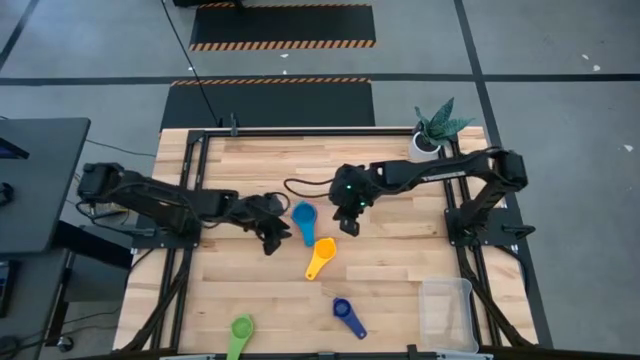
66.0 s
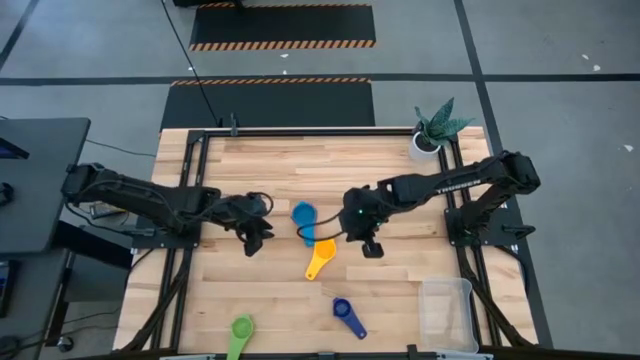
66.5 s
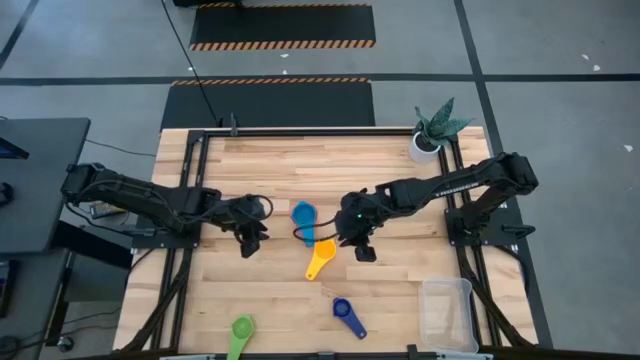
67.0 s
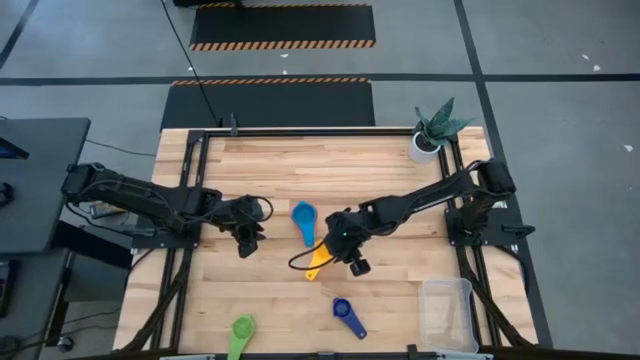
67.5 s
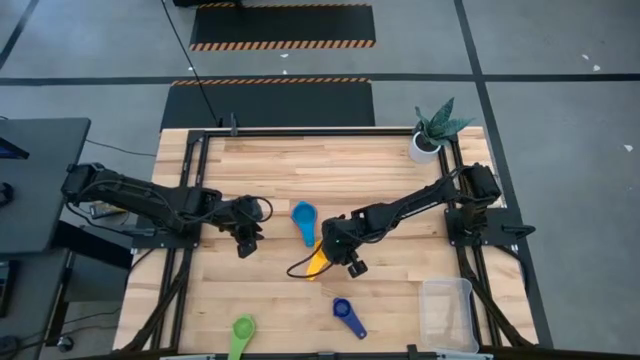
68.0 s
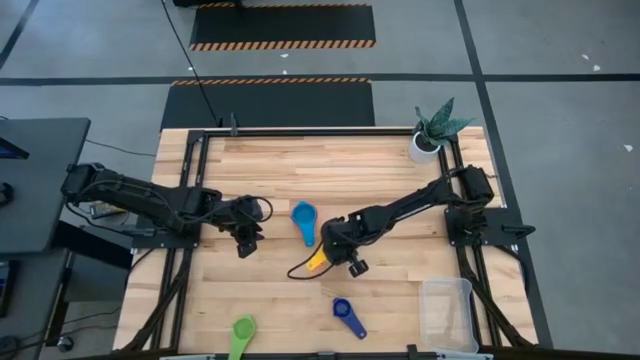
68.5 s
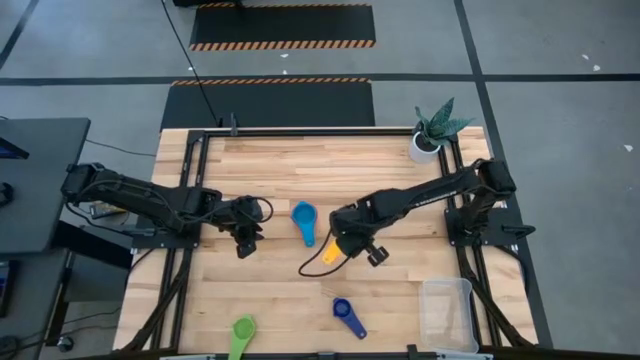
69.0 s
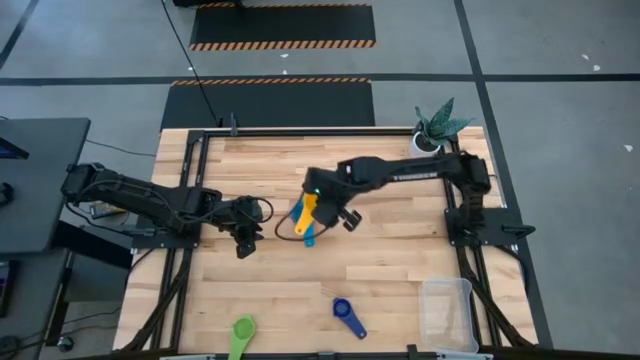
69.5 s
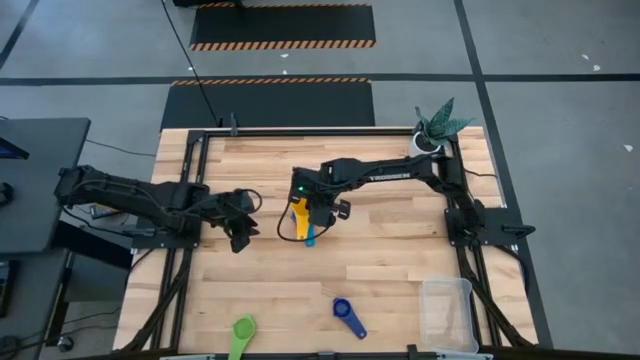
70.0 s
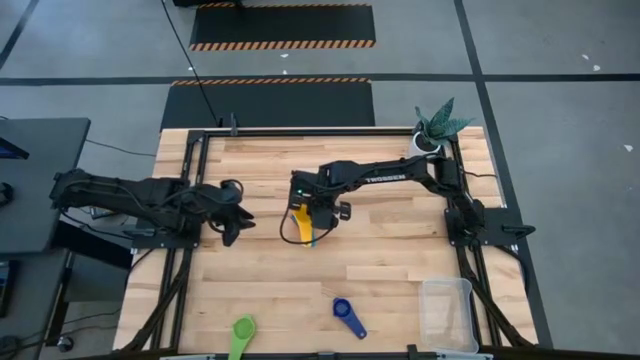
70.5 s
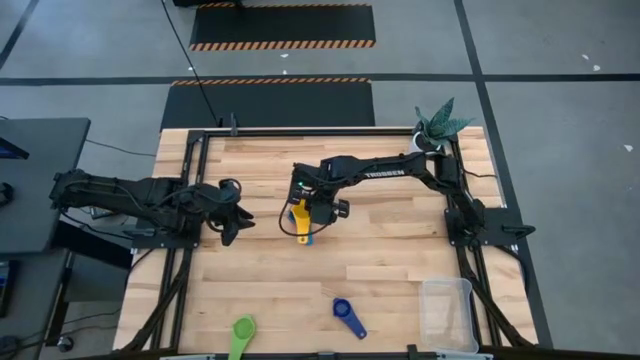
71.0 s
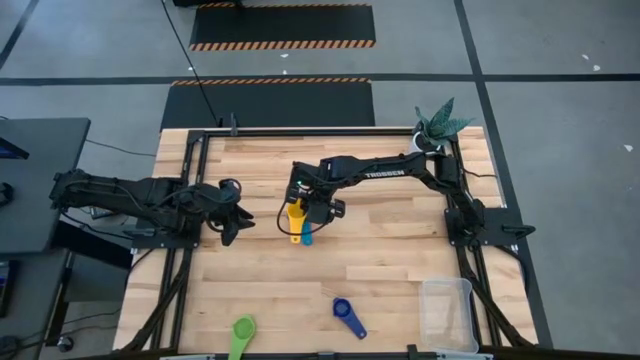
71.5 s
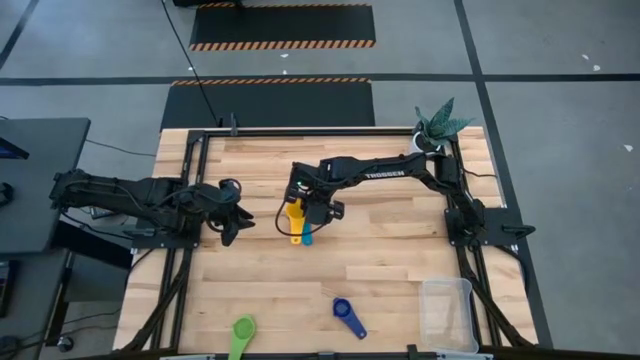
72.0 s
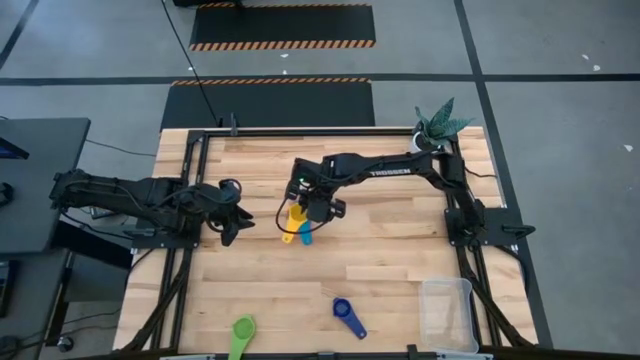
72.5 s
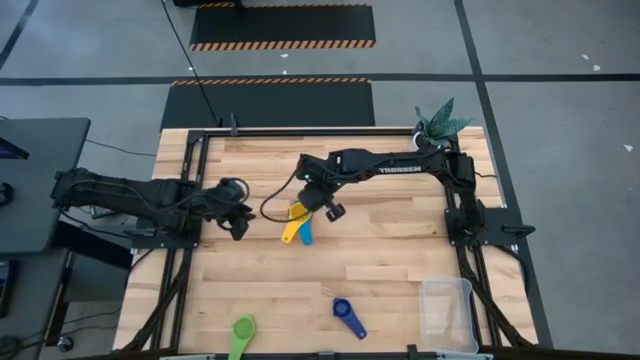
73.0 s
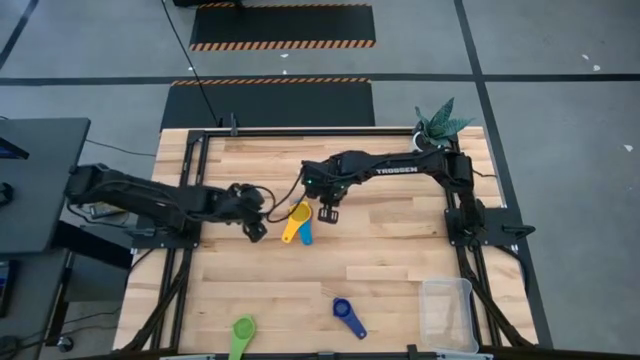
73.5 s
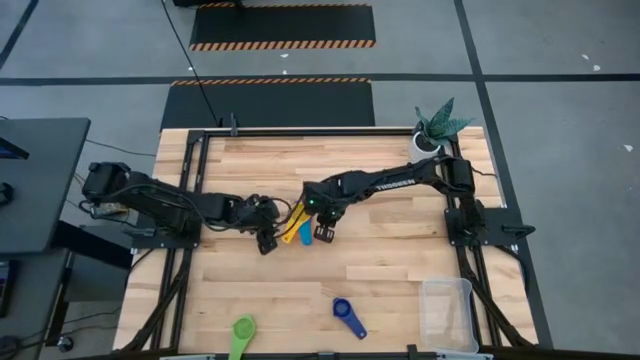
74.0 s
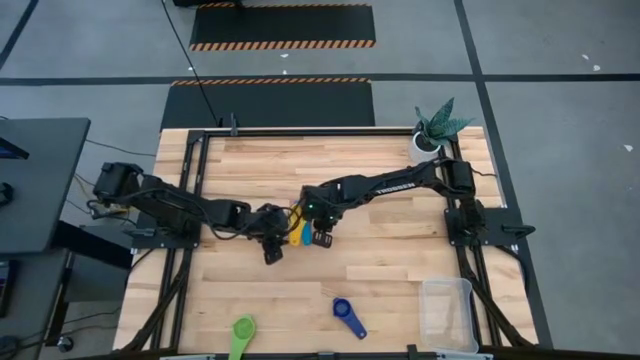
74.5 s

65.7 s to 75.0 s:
Task: Nest measuring cups in basket
Stack the yellow measuring cup on top of the light blue measuring cup

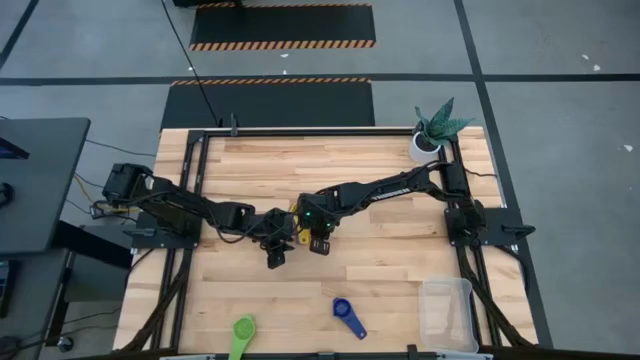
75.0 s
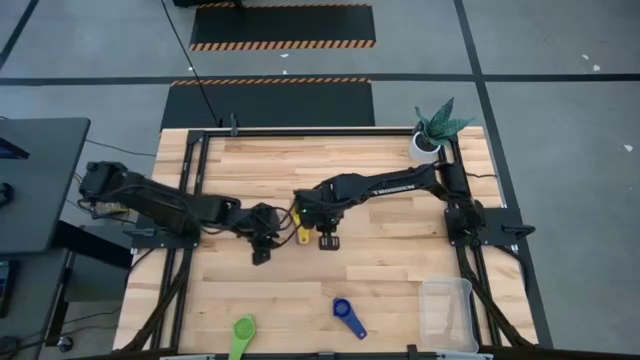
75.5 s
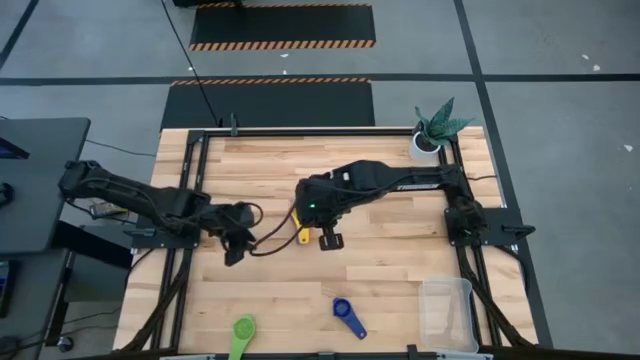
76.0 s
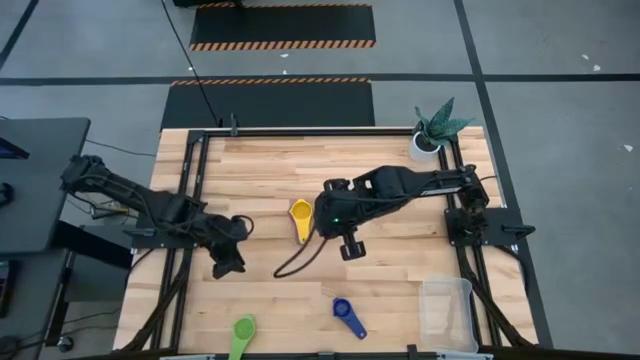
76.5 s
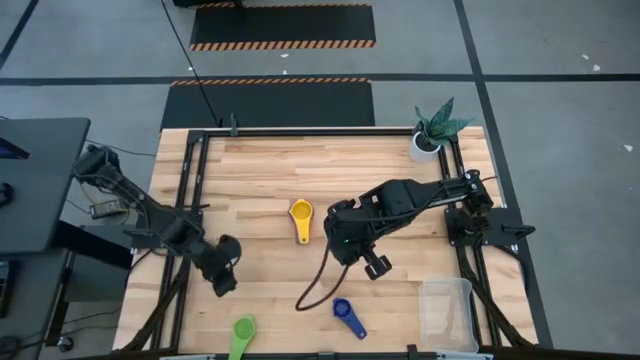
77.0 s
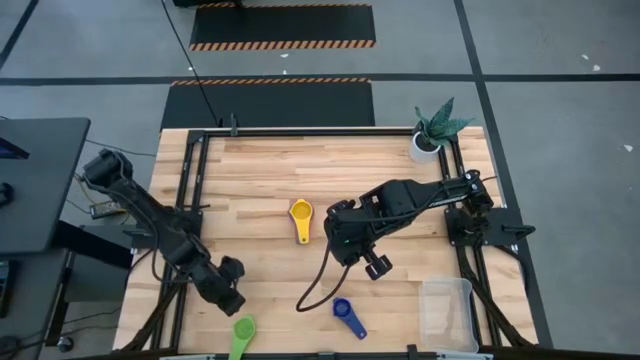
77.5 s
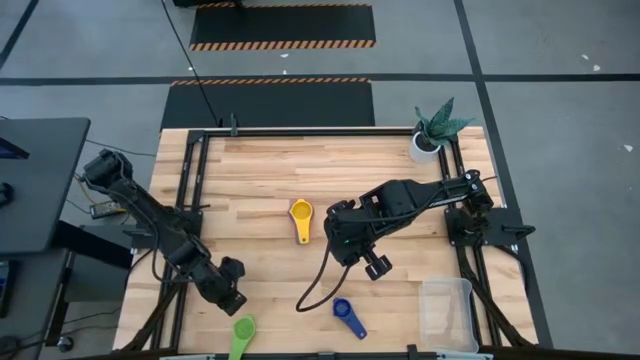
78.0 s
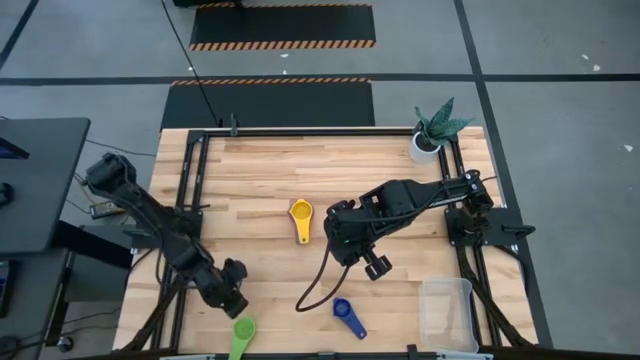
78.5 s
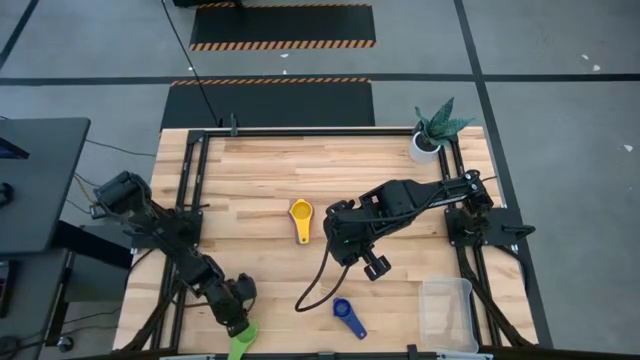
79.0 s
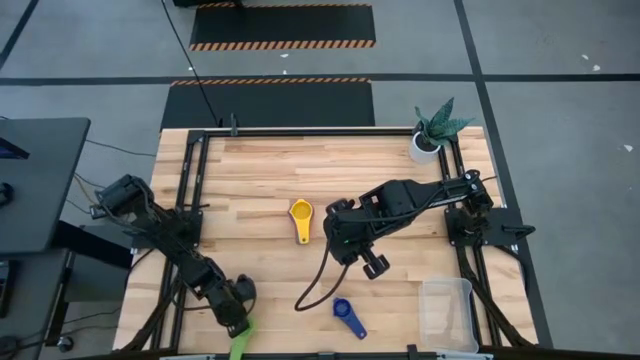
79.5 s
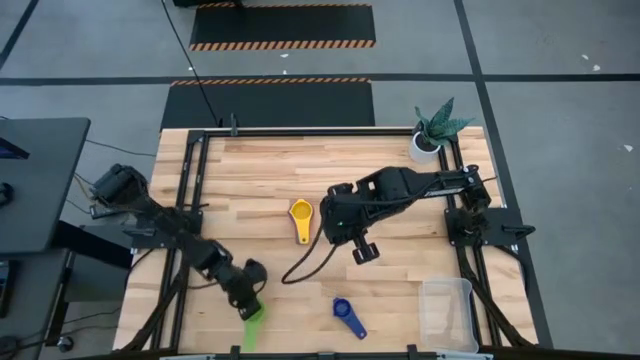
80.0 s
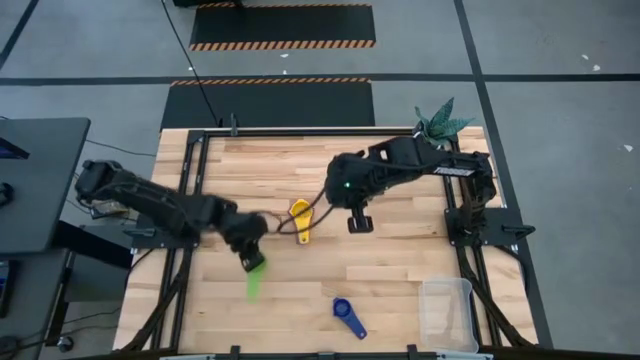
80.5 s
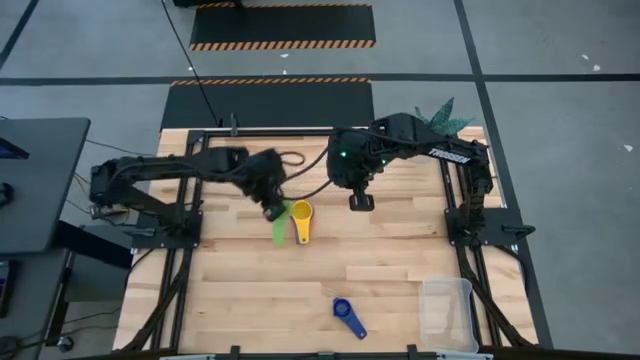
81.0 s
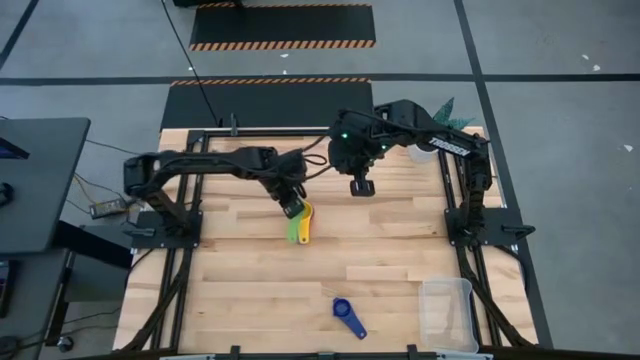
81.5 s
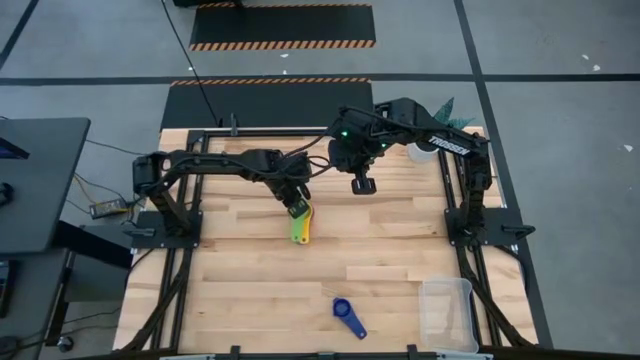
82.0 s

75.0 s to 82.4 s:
Stack the green measuring cup on top of the yellow measuring cup

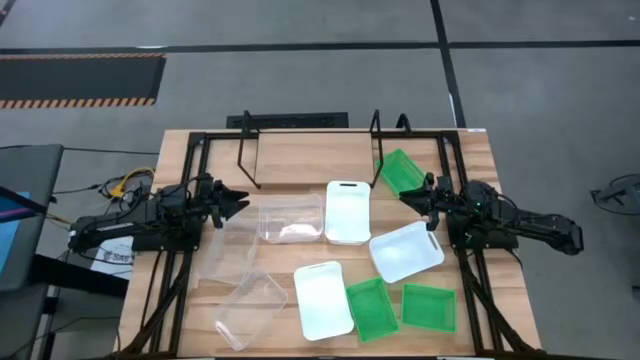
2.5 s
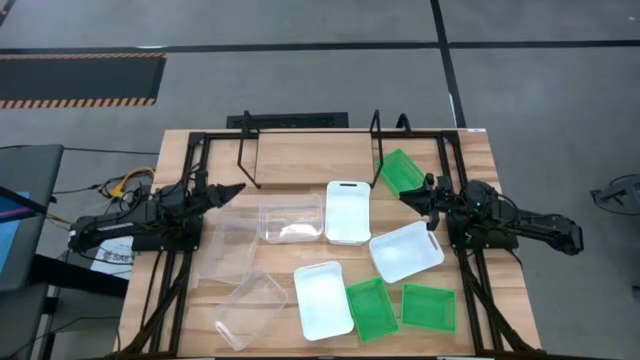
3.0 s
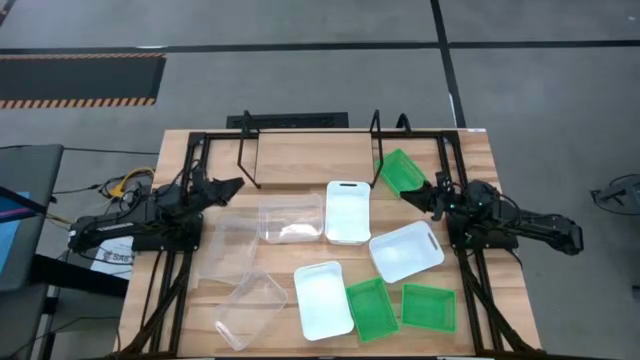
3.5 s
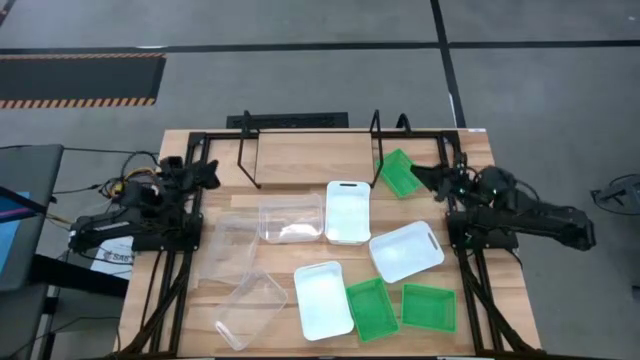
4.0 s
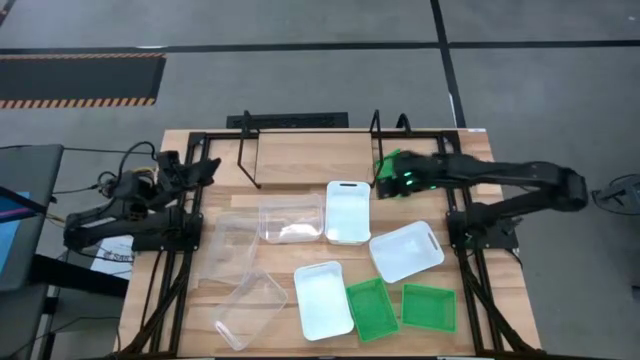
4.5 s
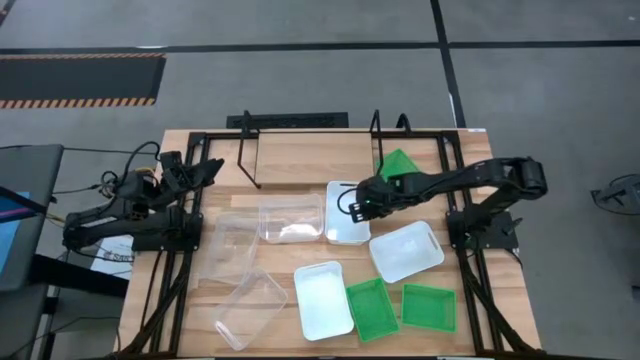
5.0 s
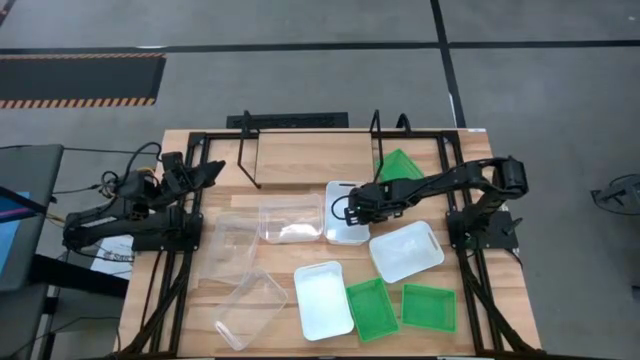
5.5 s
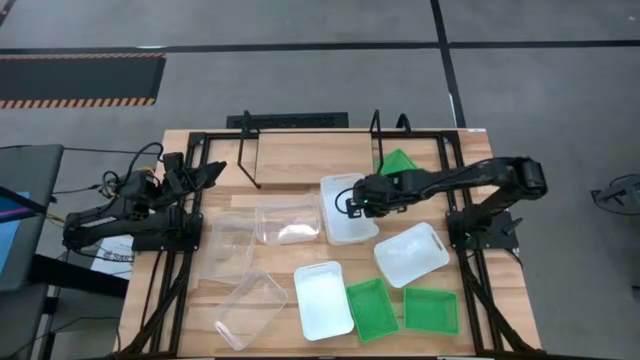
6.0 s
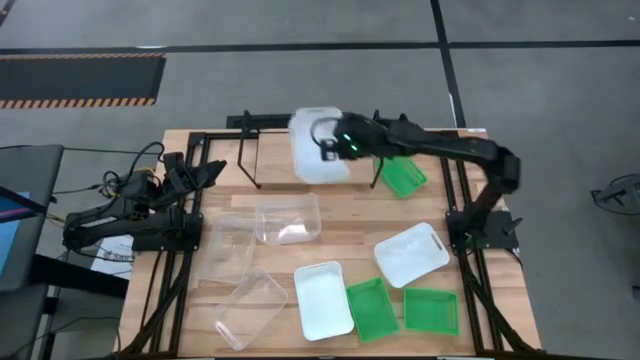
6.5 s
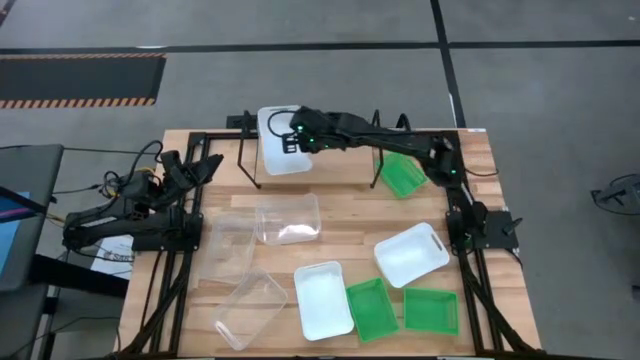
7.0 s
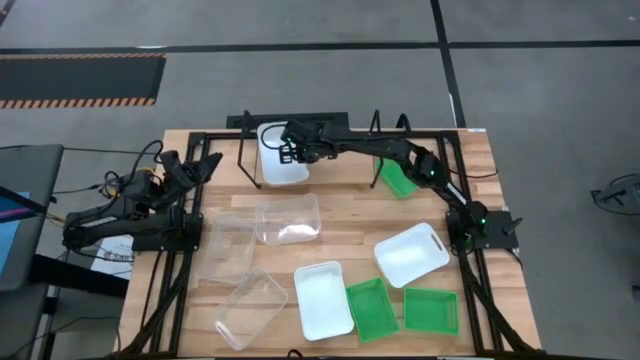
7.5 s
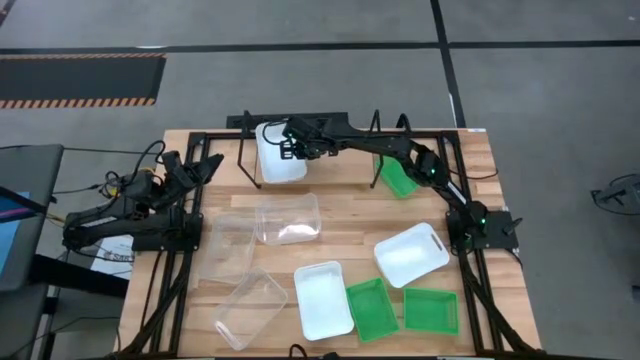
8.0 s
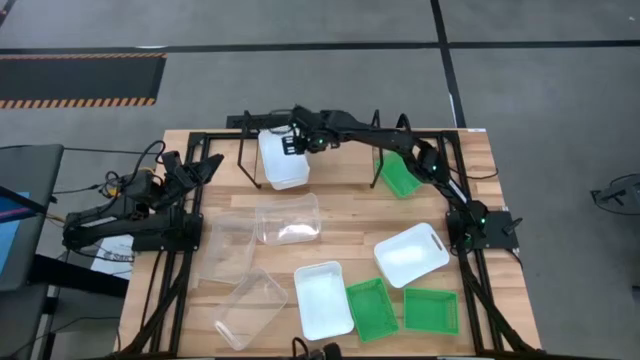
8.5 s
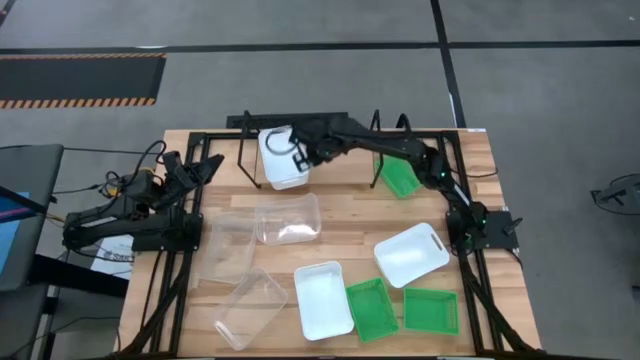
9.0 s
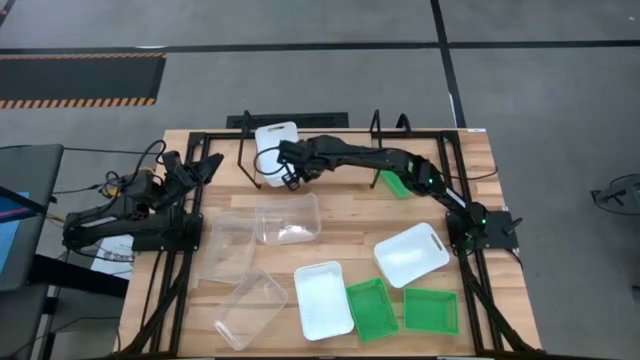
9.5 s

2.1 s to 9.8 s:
Task: Stack baskets on shelf by color
Put the top white bin on the shelf
